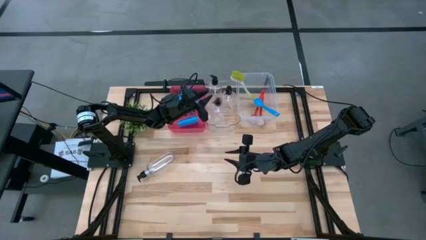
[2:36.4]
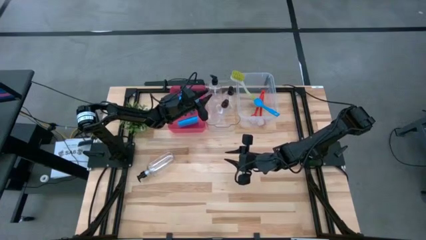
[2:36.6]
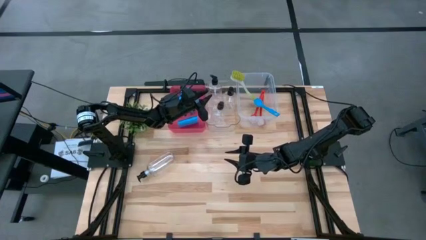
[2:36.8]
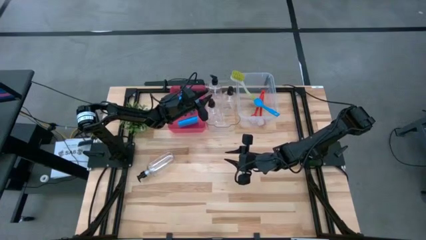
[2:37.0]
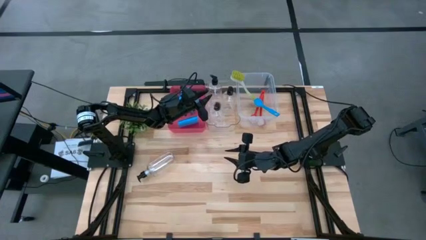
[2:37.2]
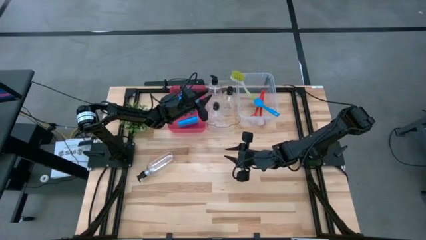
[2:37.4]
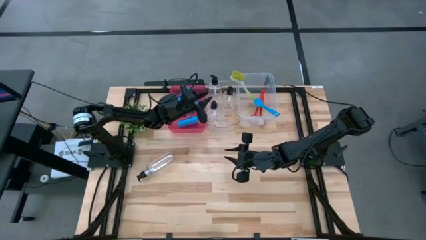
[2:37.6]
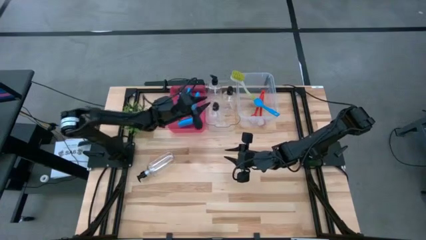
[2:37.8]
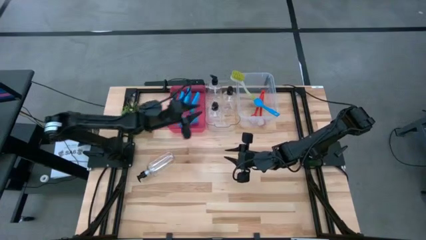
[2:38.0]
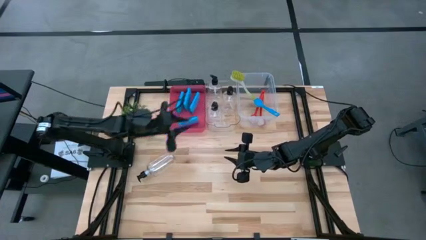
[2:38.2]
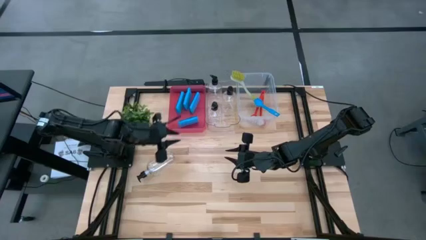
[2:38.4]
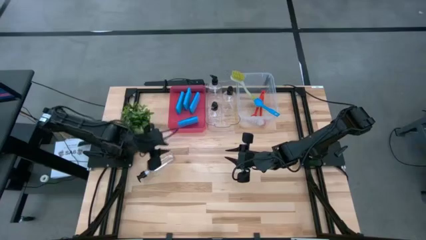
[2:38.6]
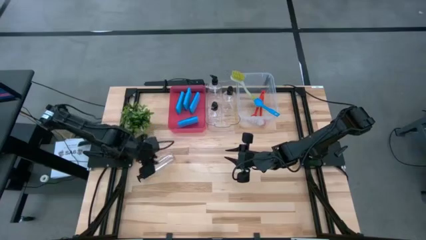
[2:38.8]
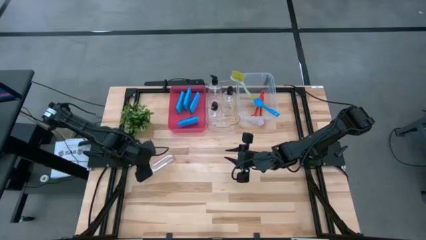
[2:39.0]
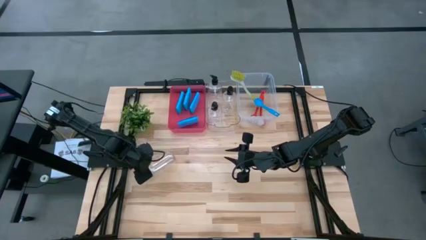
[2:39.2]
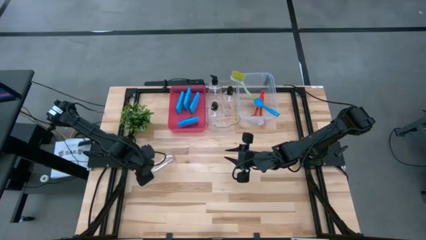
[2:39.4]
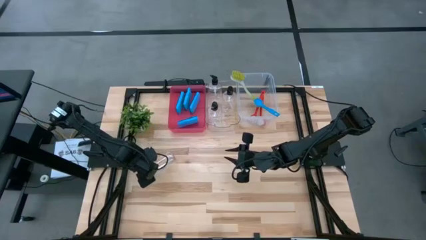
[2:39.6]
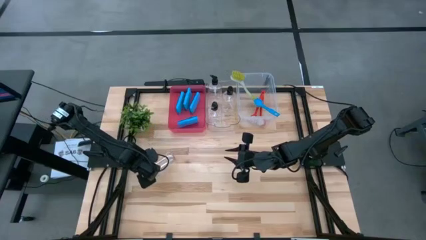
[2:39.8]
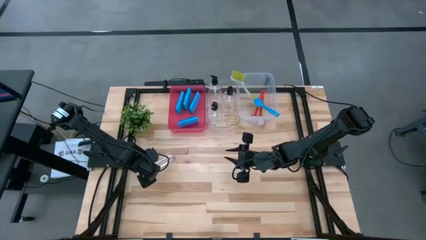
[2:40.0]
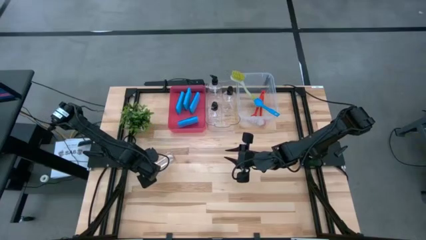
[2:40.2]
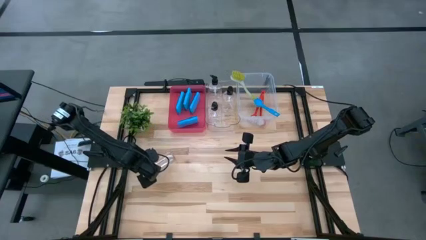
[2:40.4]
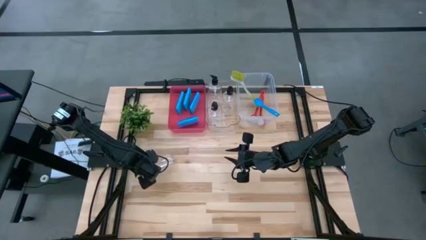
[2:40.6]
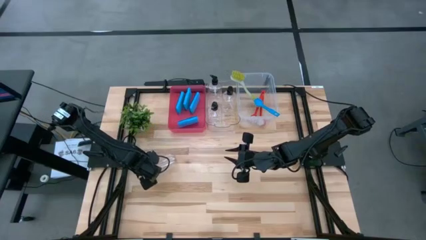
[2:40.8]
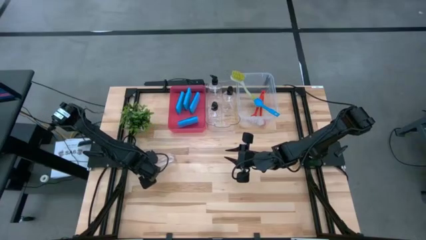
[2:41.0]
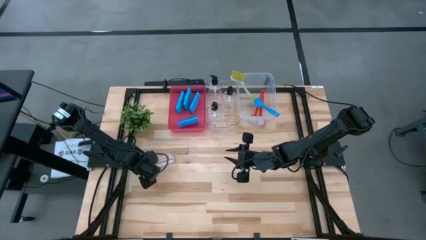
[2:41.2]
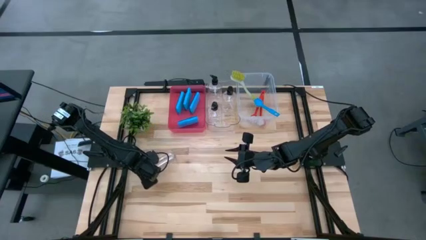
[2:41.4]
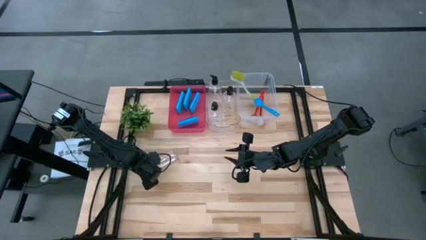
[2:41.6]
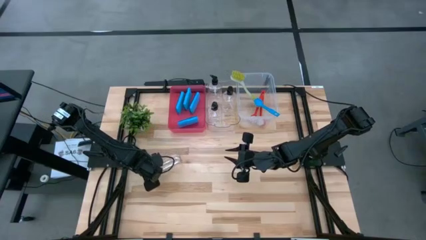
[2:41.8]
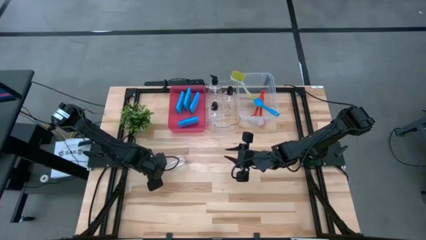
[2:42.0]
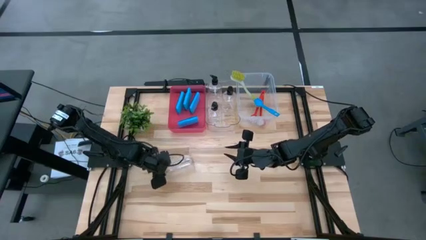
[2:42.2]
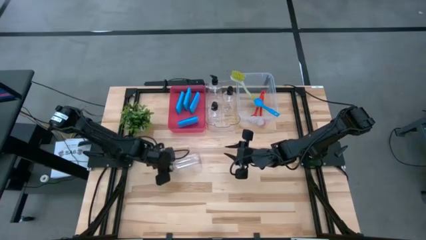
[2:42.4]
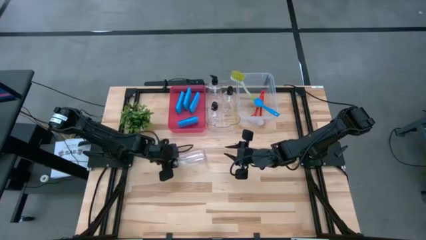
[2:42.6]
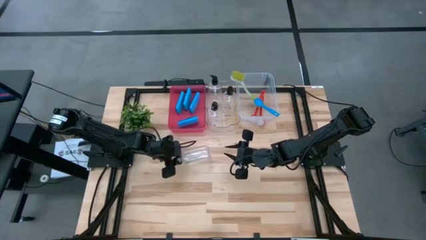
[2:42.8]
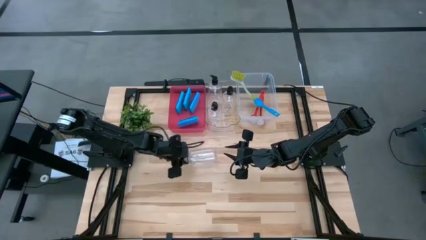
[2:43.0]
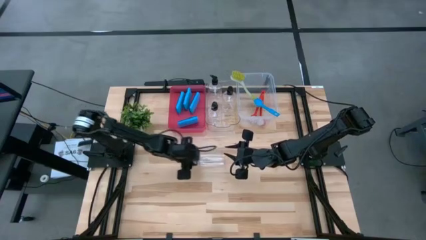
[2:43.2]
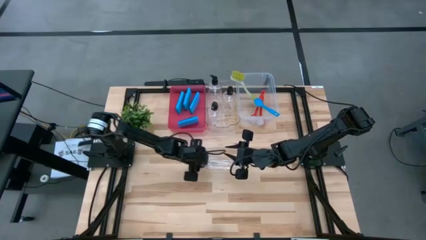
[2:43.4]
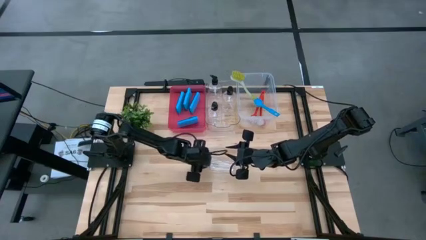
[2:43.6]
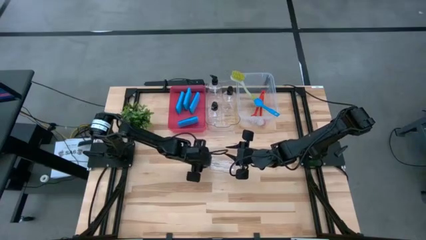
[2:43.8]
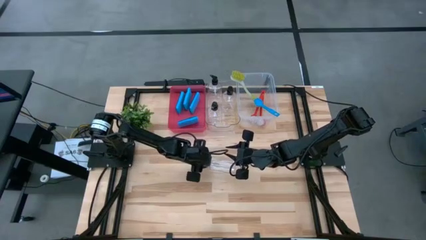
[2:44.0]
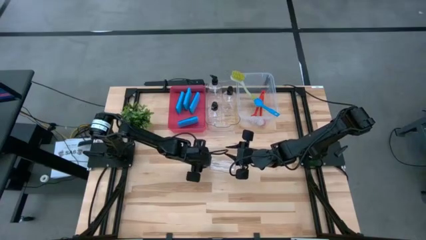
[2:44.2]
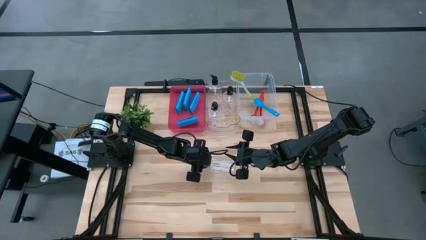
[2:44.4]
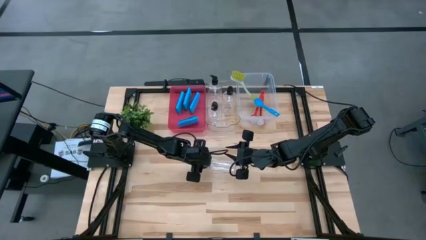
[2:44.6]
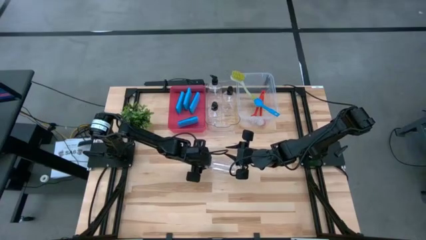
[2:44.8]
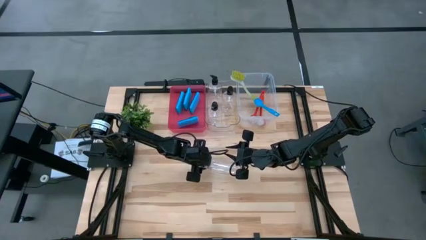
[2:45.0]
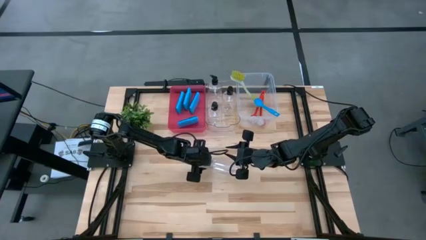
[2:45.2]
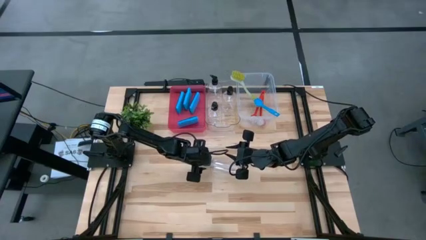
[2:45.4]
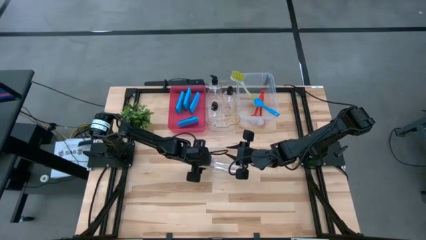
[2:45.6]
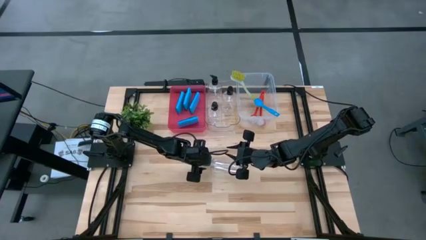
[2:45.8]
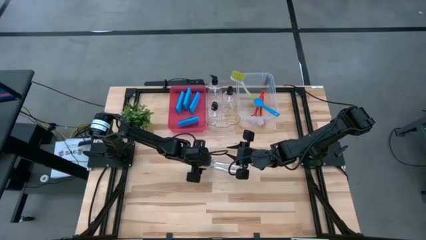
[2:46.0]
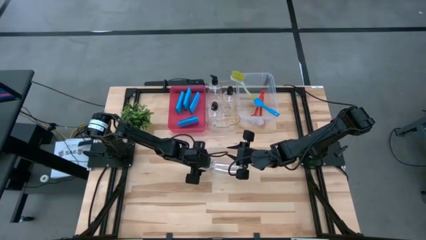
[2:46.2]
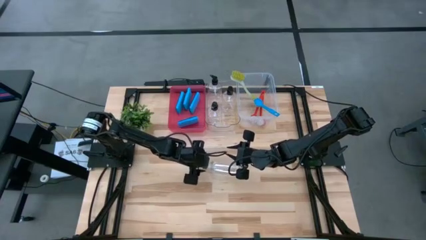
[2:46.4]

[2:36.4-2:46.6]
Task: Pick & Place Kitchen Sink Supplies
Put the spray bottle into the transparent bin

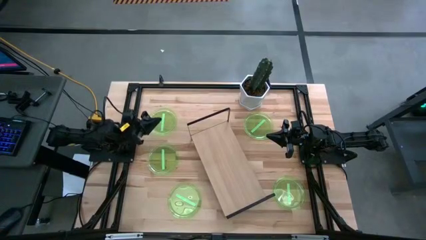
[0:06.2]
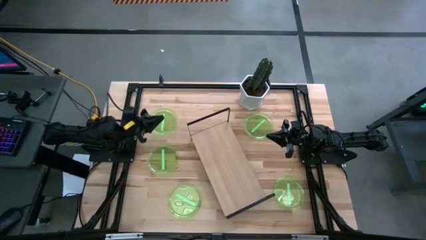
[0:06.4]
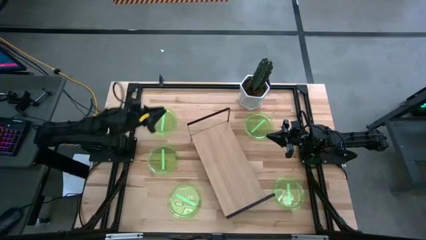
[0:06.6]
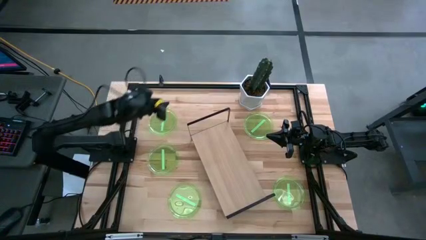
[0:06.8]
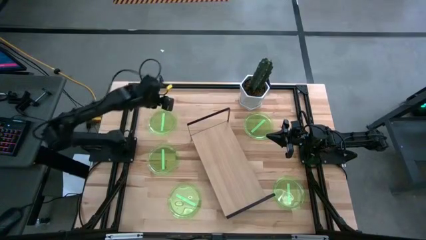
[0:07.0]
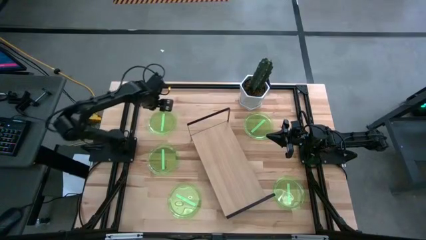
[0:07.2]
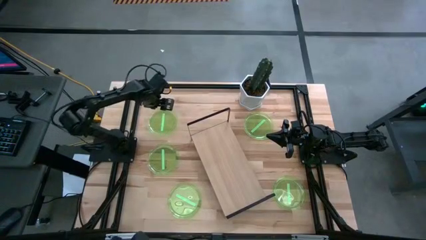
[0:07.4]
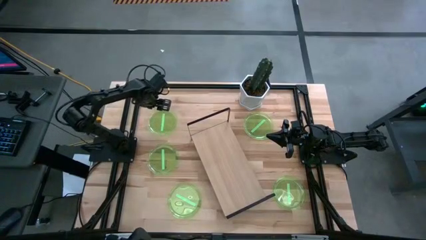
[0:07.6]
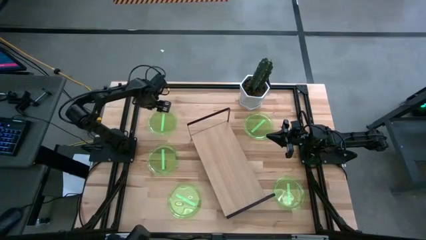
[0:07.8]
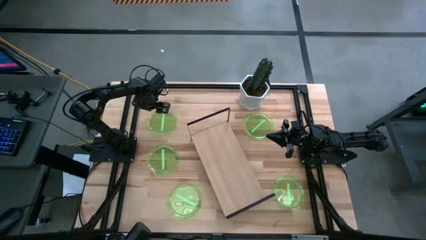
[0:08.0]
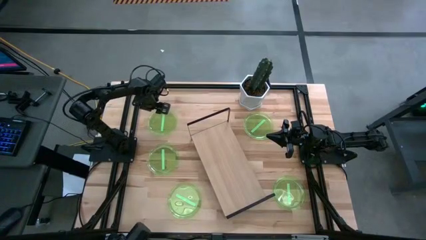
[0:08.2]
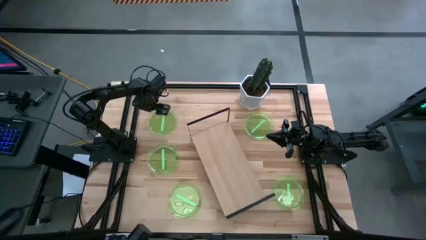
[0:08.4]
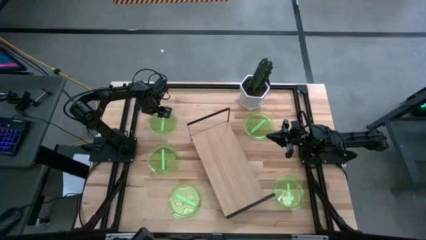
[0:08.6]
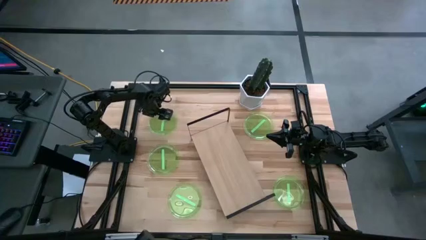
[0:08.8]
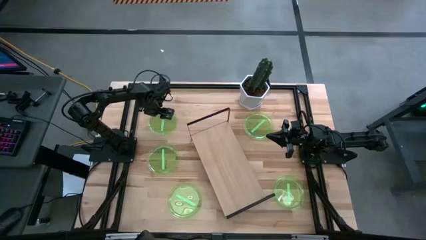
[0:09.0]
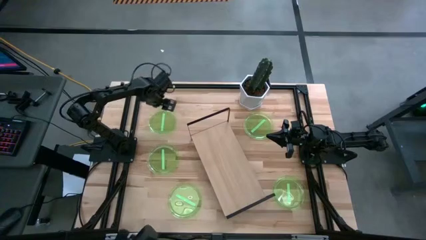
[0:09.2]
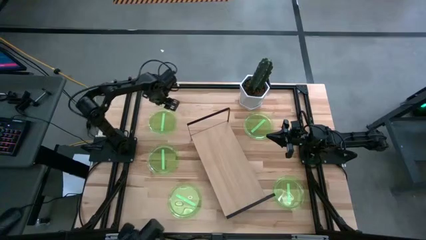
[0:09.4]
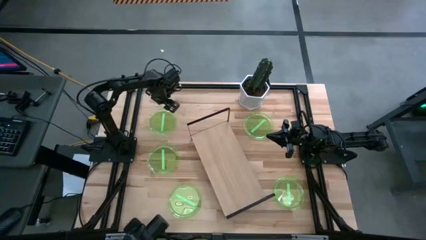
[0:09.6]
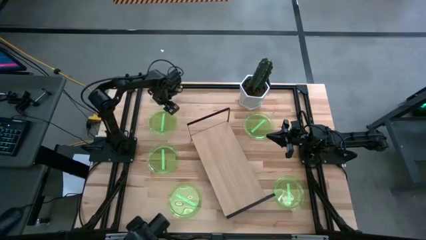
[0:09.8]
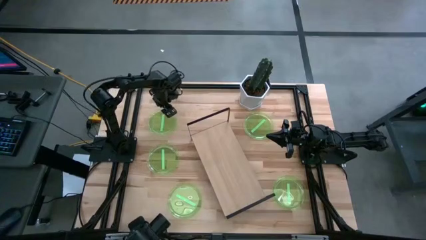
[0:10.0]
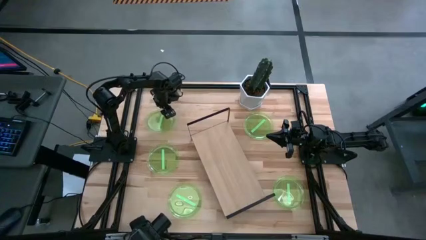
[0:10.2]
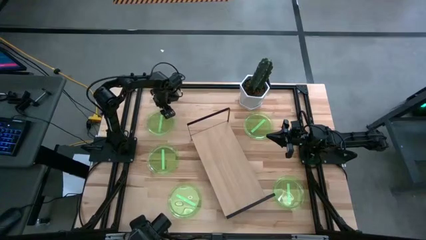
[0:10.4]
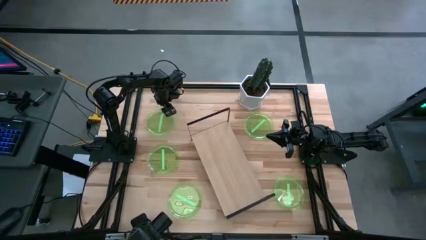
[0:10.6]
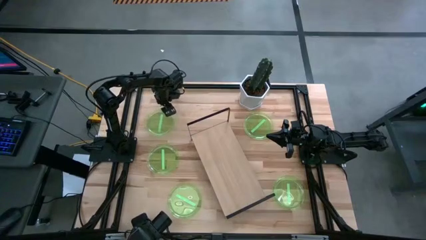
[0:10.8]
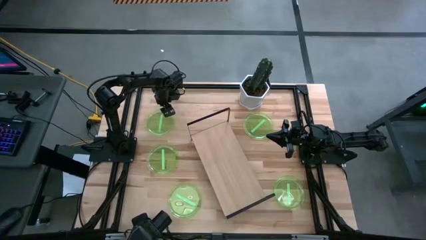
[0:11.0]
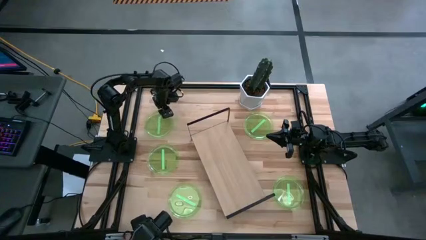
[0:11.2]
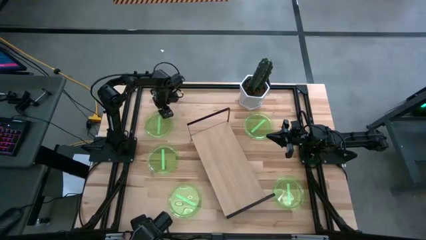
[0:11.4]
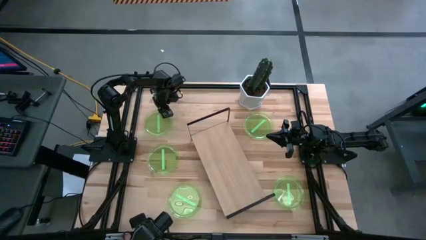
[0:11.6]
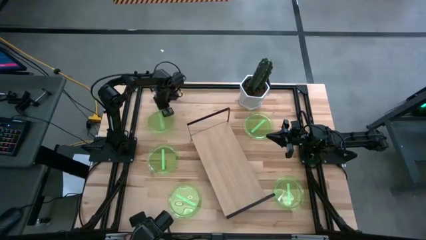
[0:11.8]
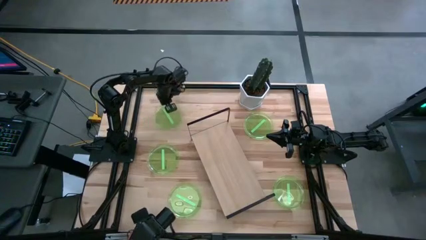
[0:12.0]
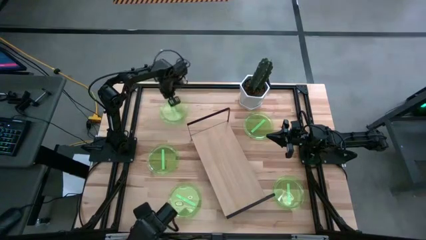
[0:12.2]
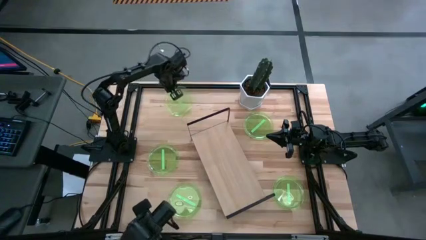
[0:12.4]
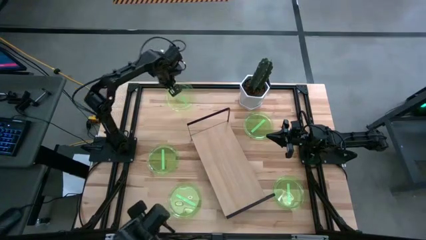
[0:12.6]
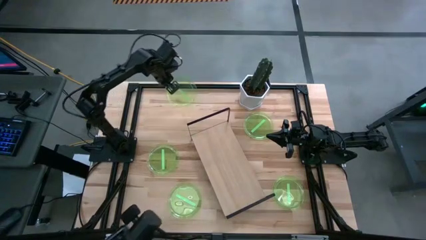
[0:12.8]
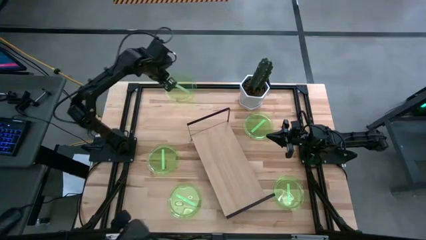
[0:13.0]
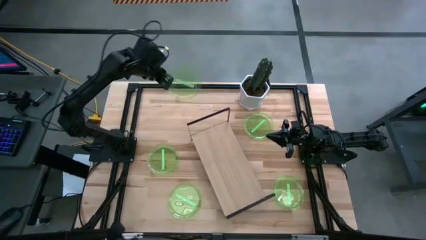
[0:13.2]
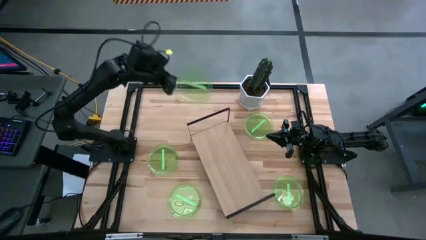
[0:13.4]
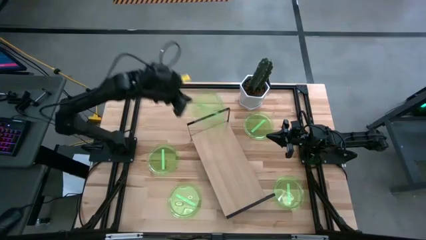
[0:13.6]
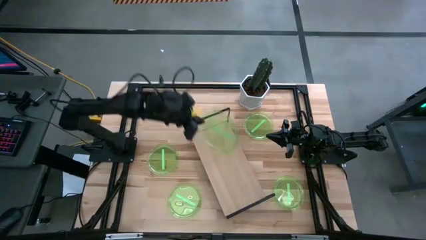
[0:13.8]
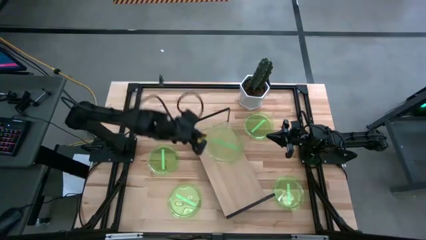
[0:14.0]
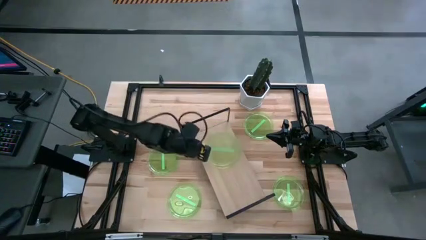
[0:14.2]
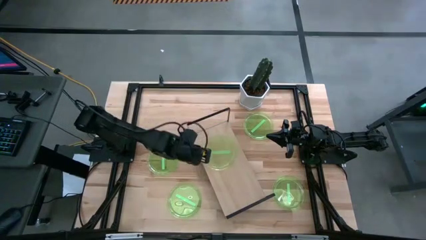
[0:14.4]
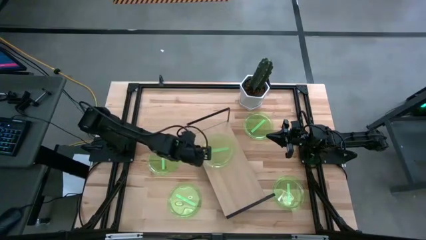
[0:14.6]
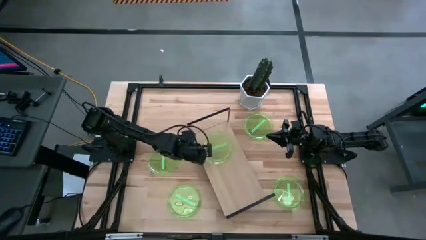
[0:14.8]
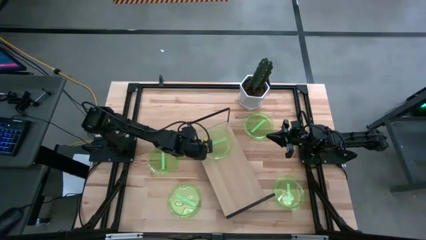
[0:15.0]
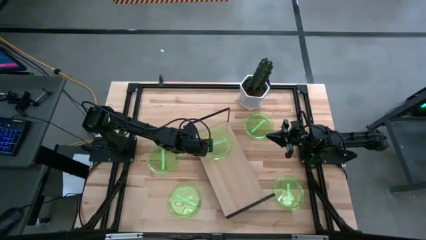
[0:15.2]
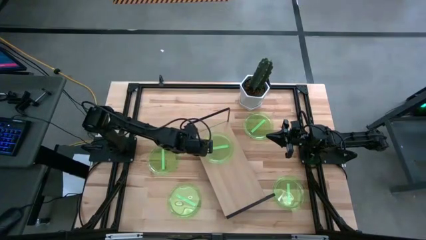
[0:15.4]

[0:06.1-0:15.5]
Task: Place and stack plates onto a shelf
Put the top left green plate on the shelf
